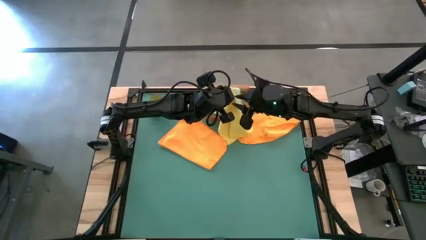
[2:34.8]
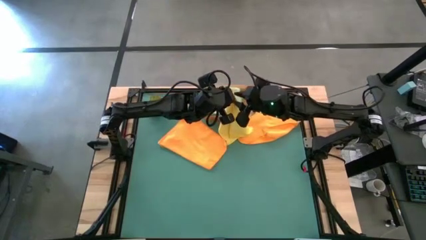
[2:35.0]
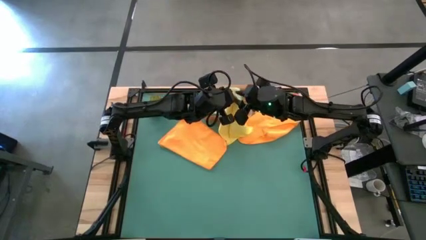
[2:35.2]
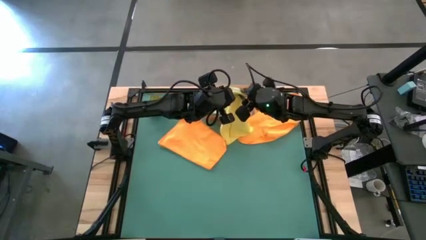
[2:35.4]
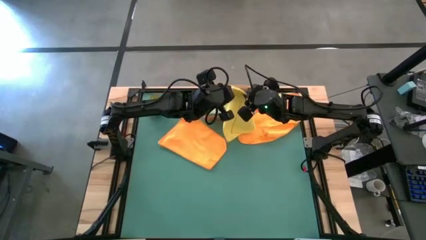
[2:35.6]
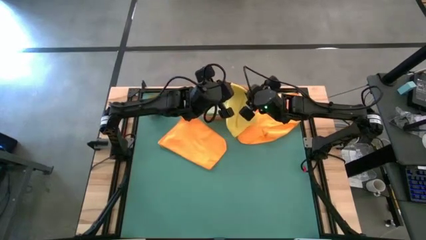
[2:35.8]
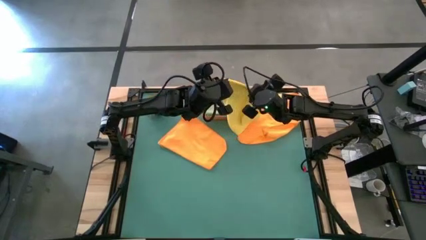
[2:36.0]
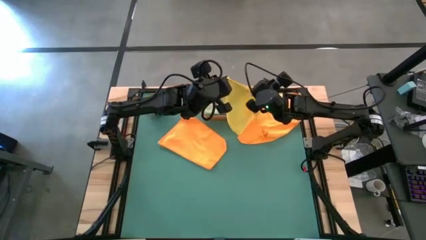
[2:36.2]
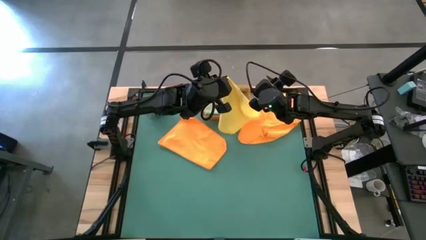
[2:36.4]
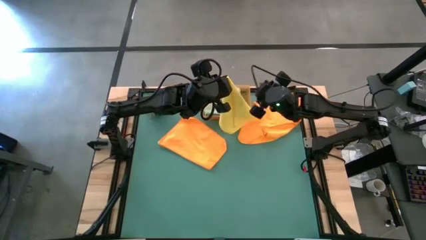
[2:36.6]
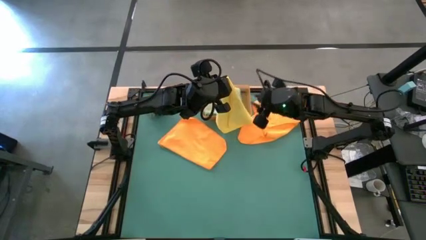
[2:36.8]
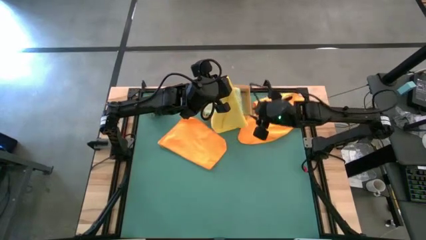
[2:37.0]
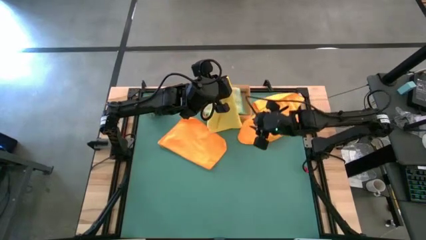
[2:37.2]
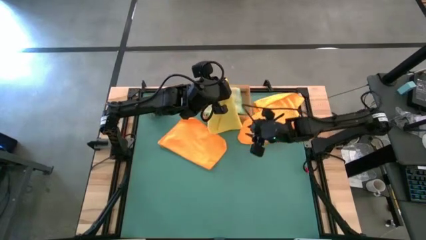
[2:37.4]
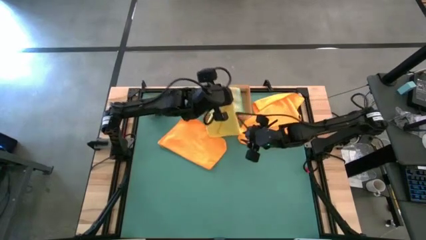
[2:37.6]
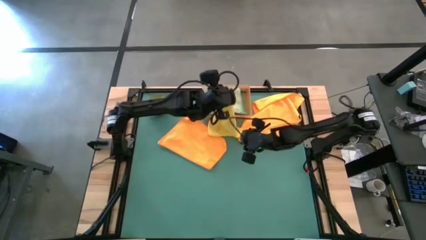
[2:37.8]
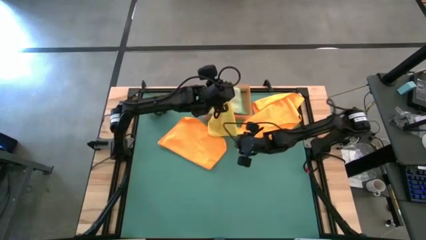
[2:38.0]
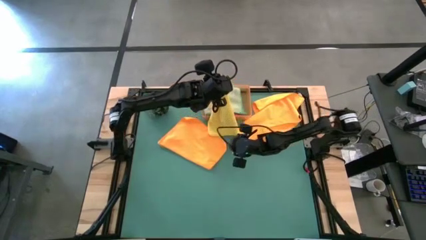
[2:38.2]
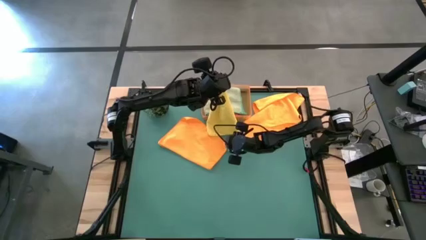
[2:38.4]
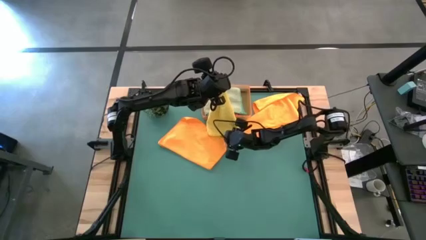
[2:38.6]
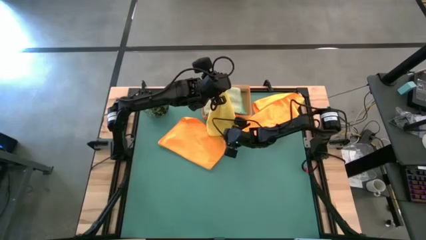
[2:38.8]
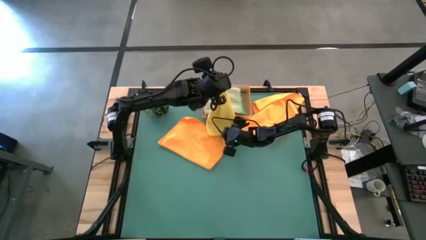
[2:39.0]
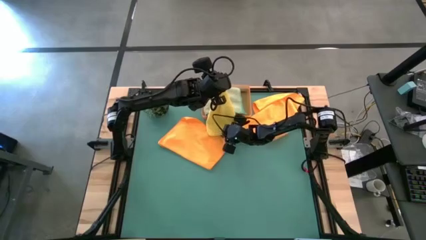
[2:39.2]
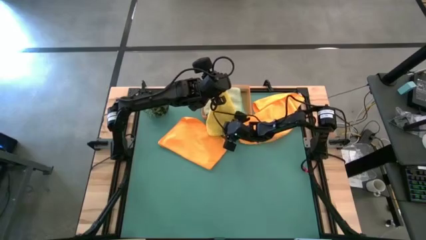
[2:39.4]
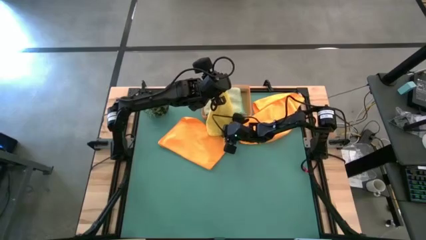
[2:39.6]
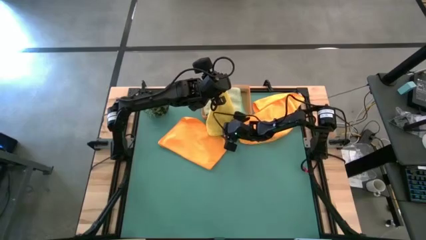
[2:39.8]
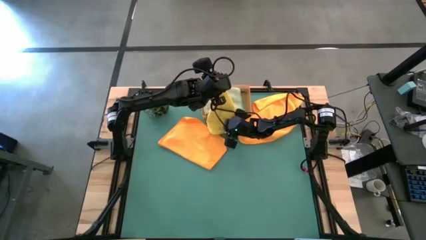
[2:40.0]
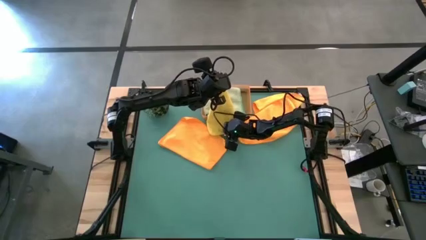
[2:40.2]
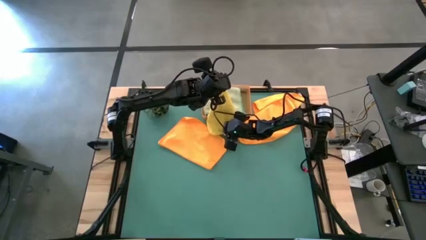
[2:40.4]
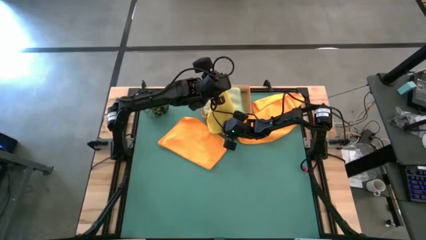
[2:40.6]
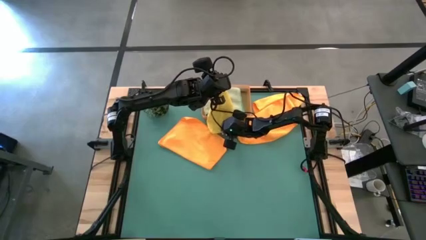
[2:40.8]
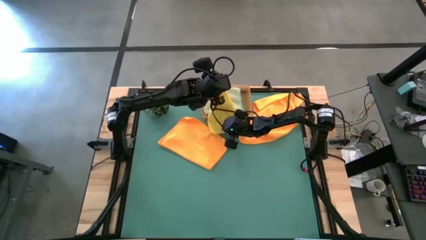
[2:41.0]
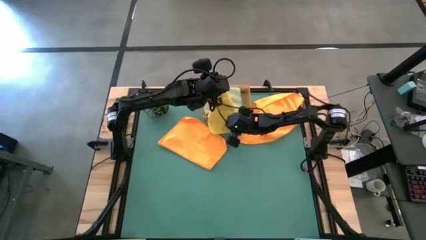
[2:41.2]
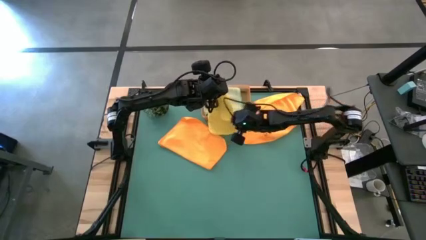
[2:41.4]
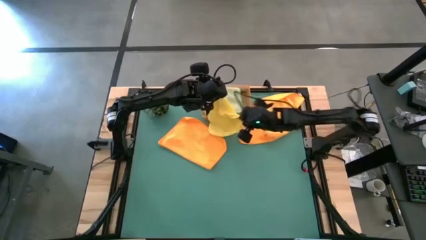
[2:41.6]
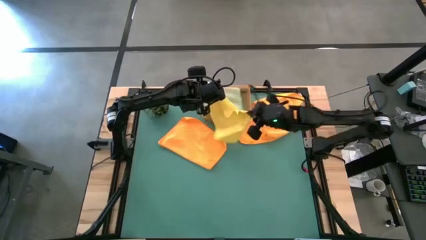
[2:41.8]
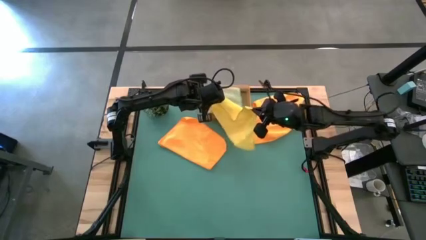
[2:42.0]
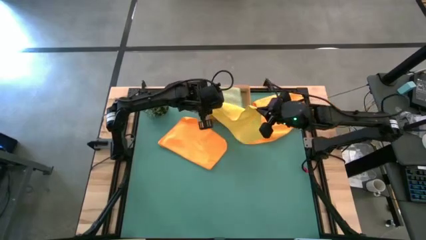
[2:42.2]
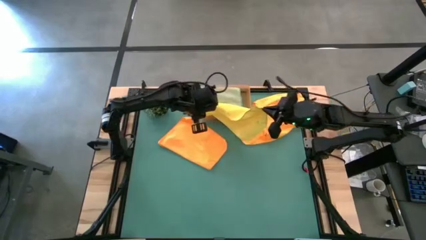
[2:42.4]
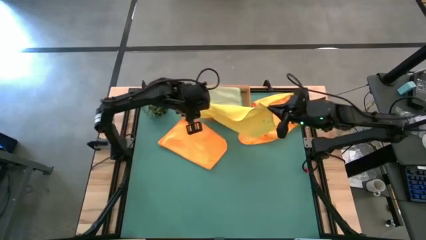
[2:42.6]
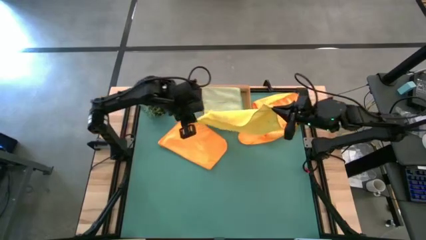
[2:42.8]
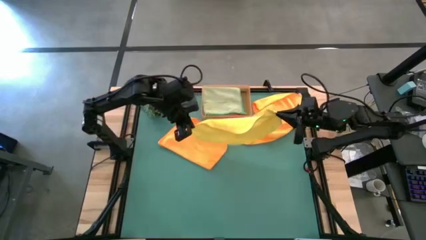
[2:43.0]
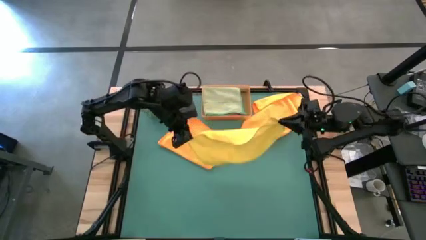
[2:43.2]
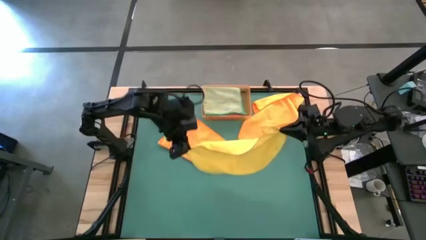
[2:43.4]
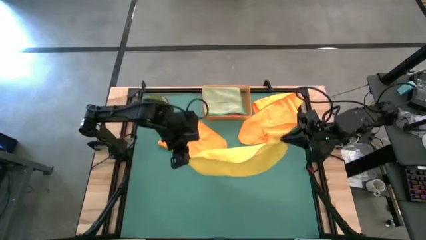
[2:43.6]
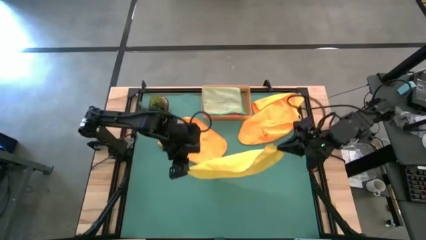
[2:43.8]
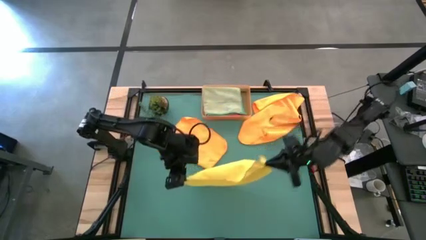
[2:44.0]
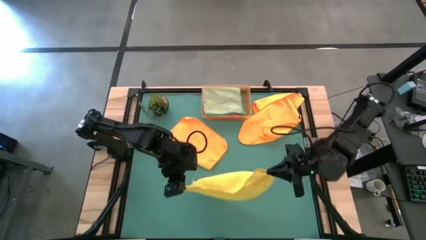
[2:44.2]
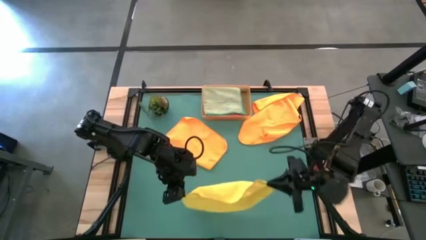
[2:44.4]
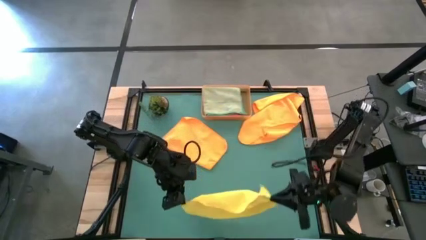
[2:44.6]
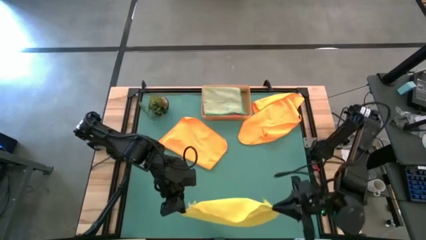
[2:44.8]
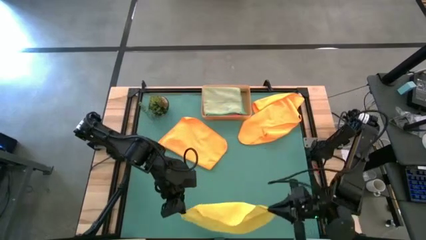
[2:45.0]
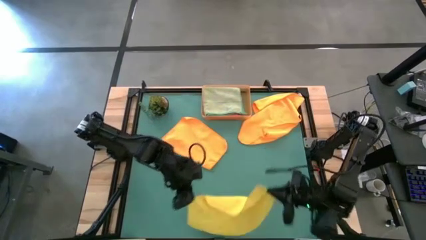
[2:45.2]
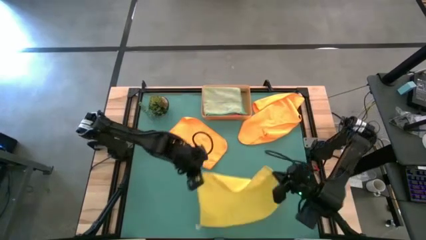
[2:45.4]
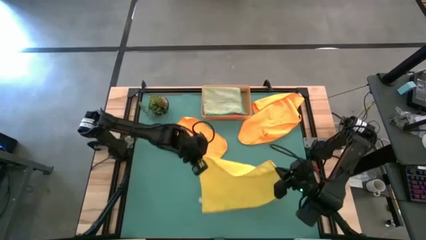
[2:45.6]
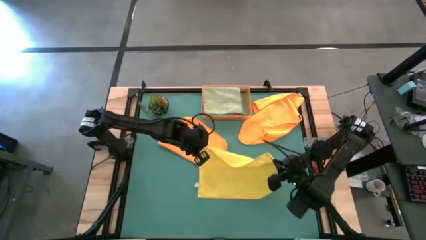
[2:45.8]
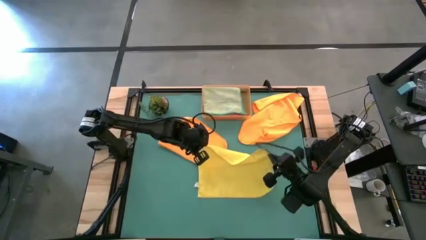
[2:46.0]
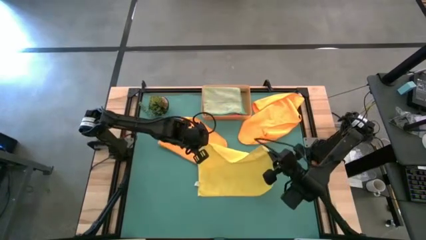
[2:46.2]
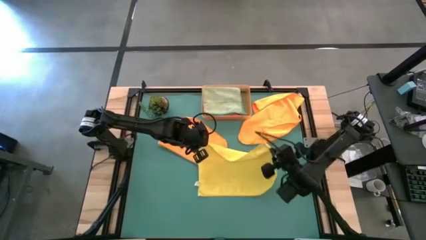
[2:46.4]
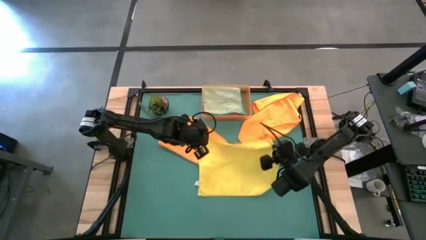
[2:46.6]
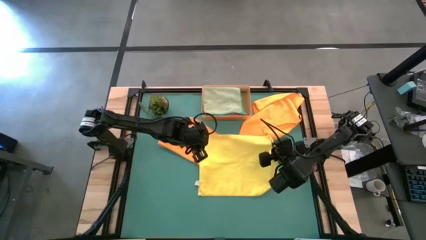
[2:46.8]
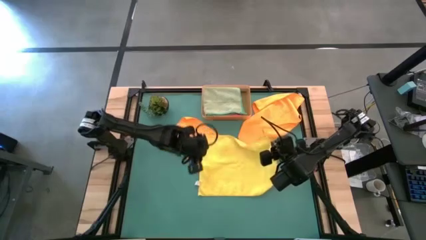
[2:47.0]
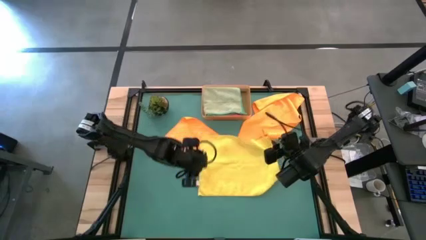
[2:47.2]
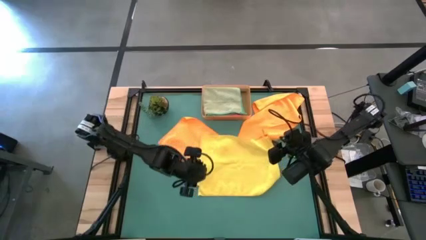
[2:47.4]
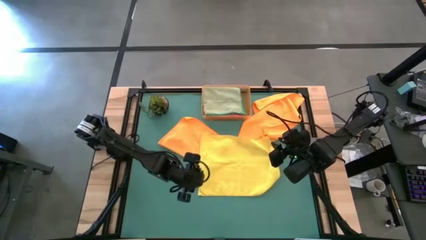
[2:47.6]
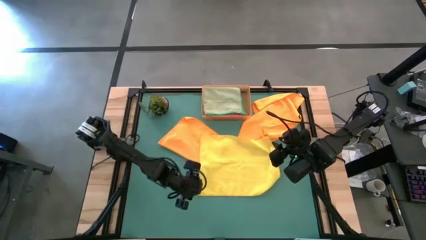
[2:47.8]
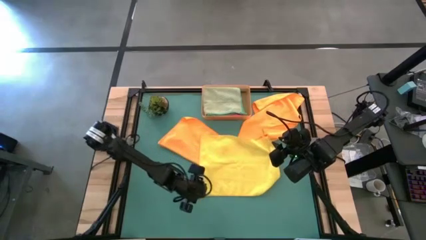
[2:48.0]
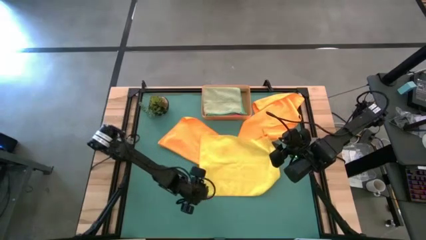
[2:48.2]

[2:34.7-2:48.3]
Task: Fold microfiber towels
Fold the yellow microfiber towel
